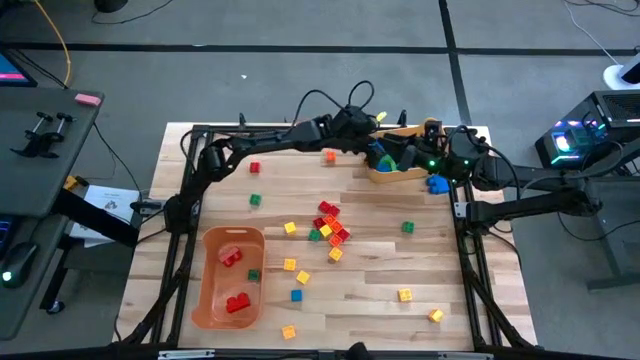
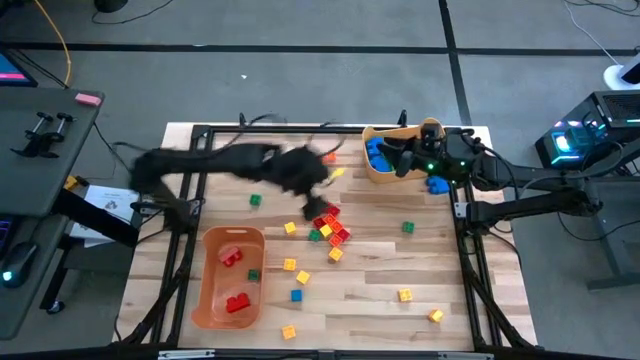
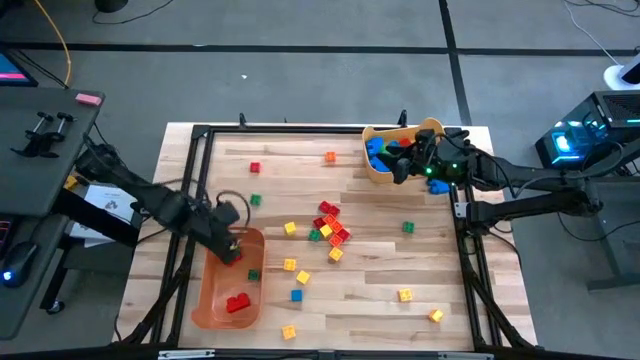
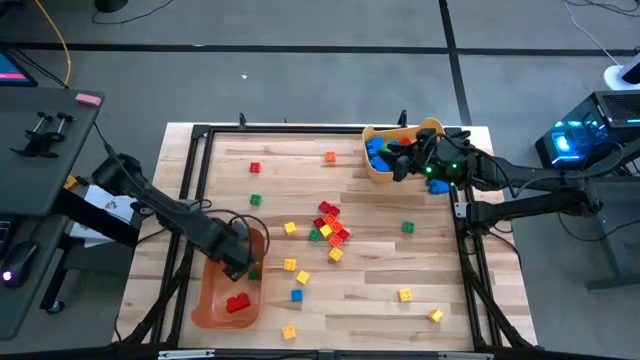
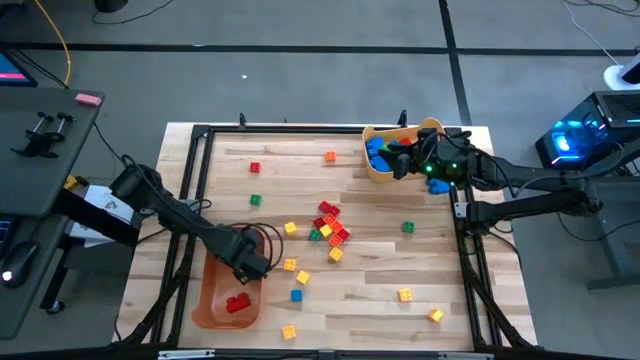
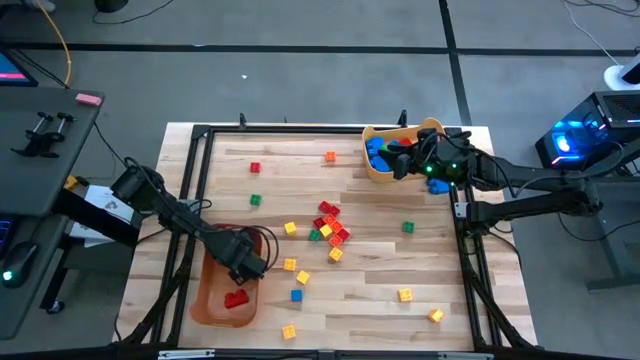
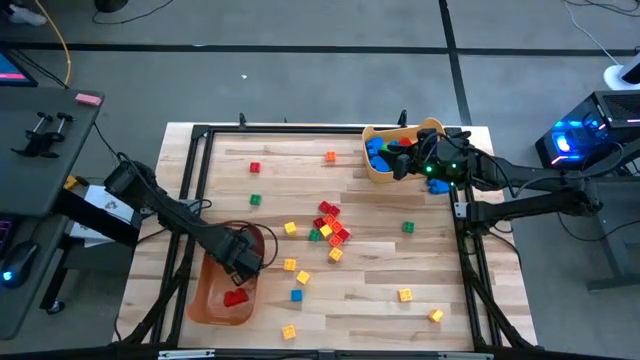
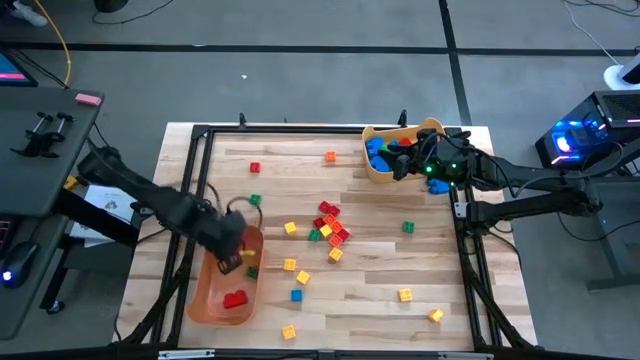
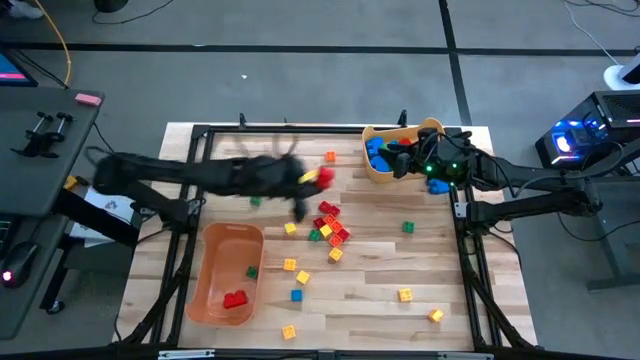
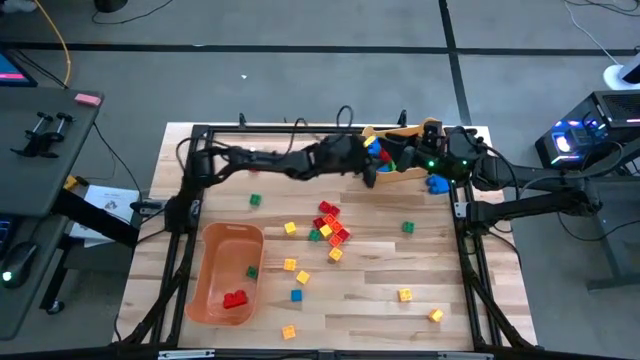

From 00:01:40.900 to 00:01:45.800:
Task: Sort blocks by size
Remove the red game piece from the orange bin and put it into the yellow bin

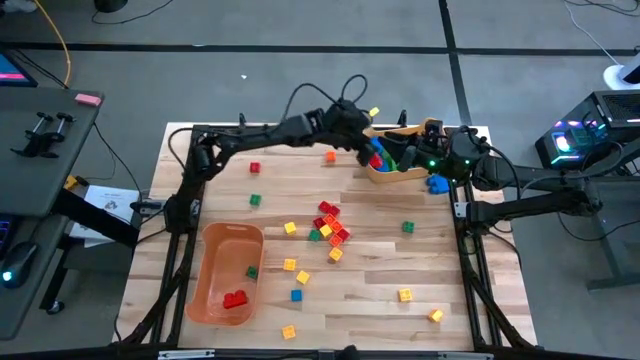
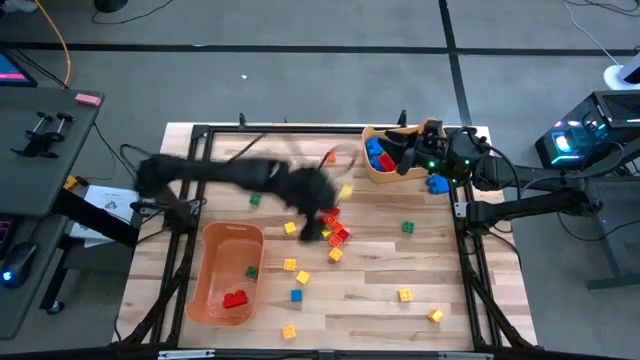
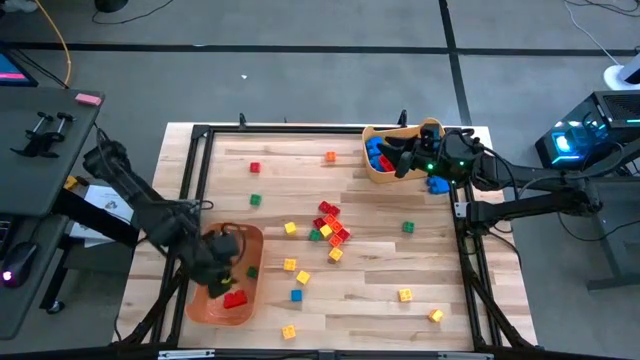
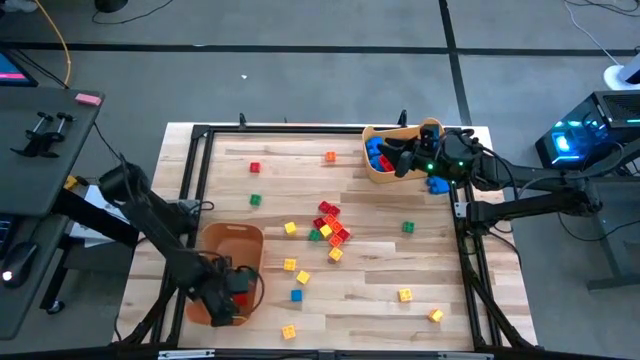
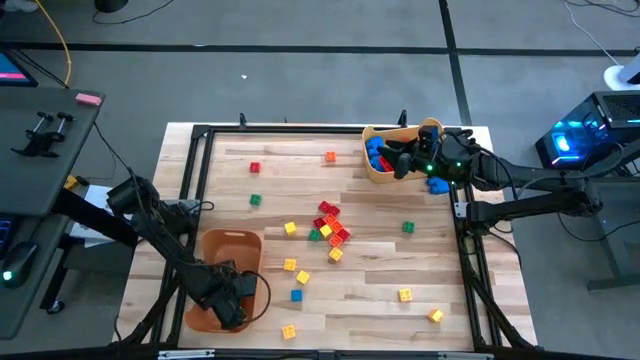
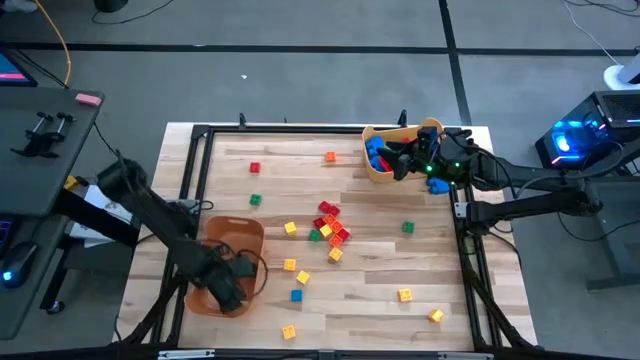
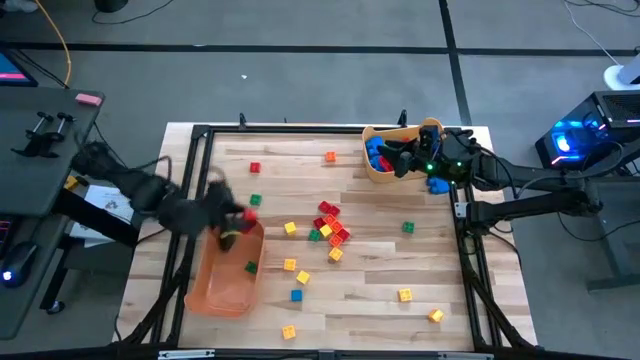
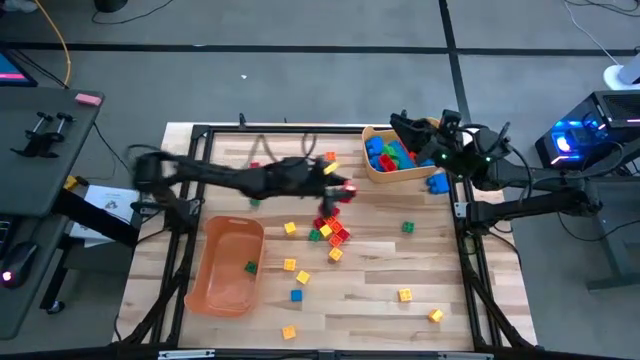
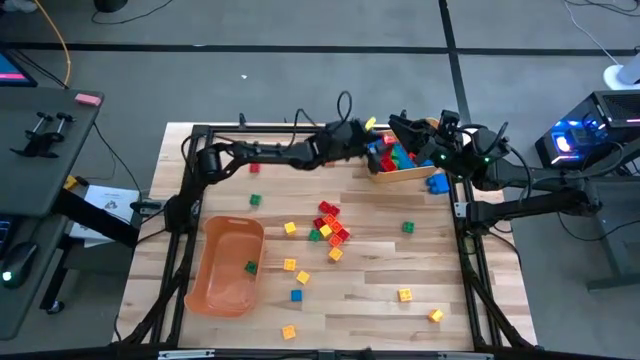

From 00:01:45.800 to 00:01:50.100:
Remove the red game piece from the orange bin and put it into the yellow bin

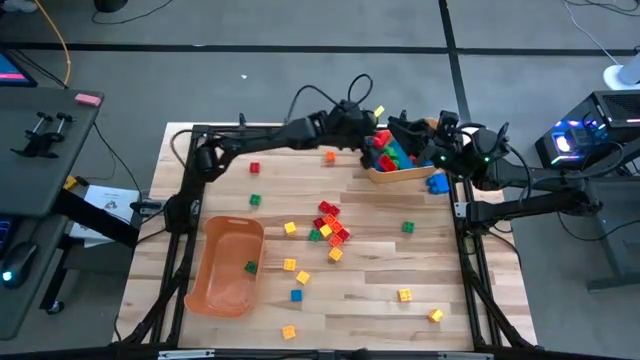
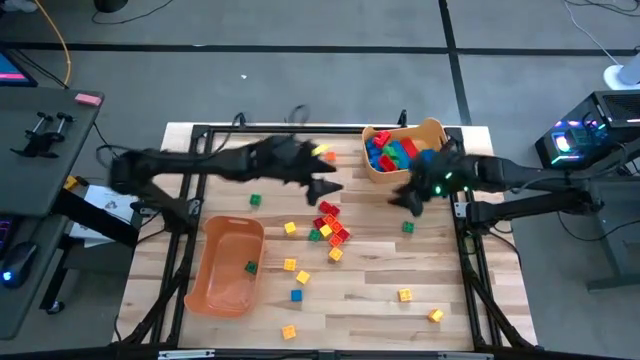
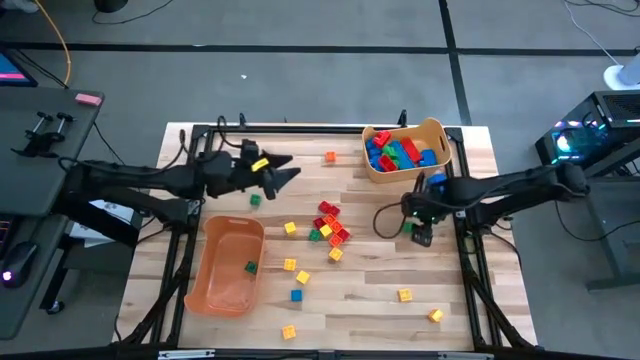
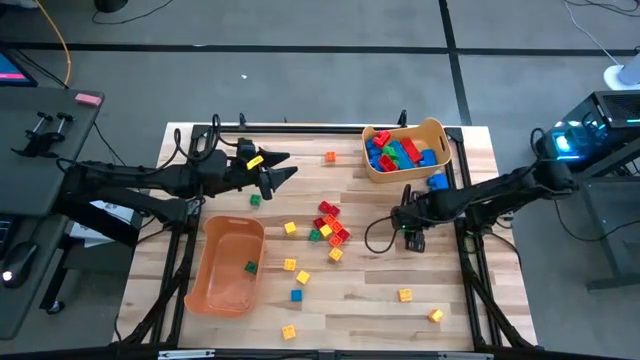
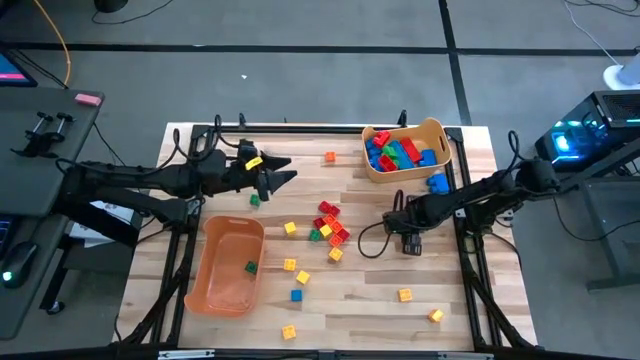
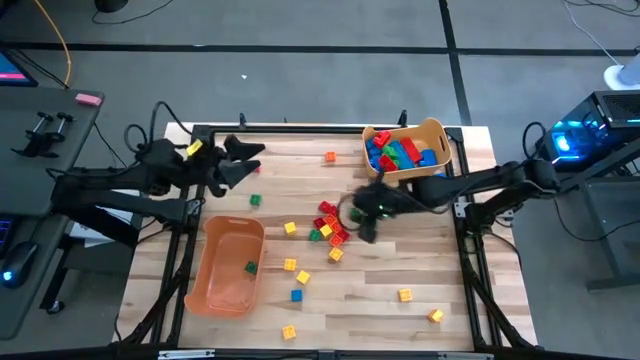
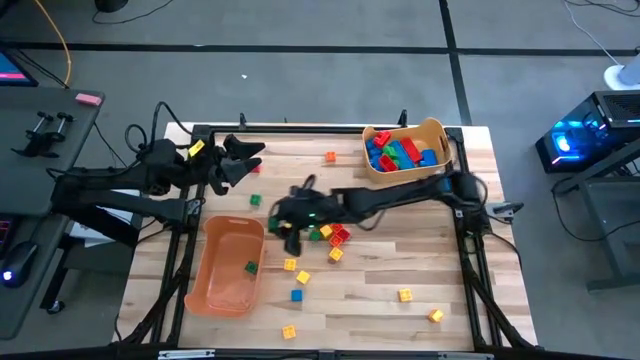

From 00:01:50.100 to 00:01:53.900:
Put the green game piece into the orange bin

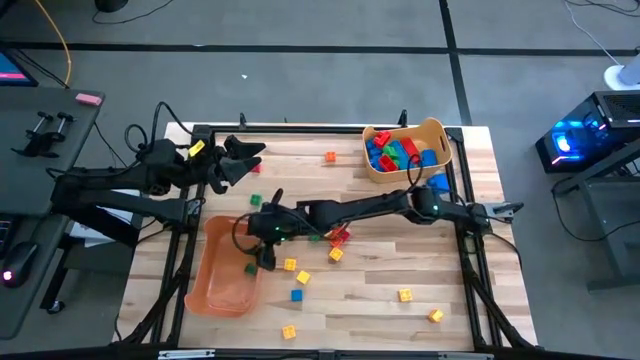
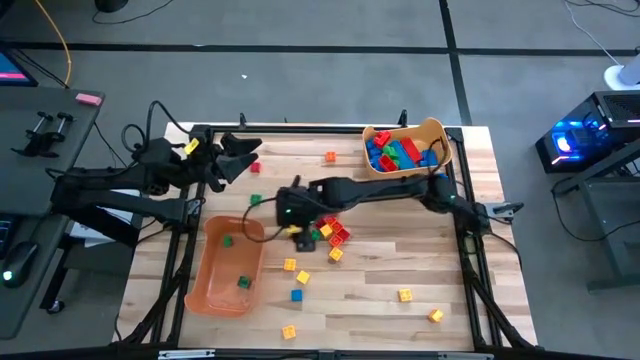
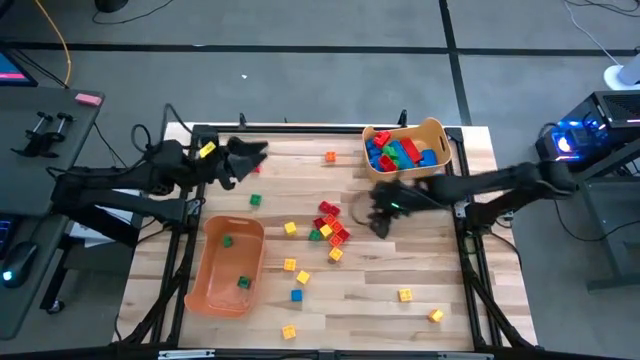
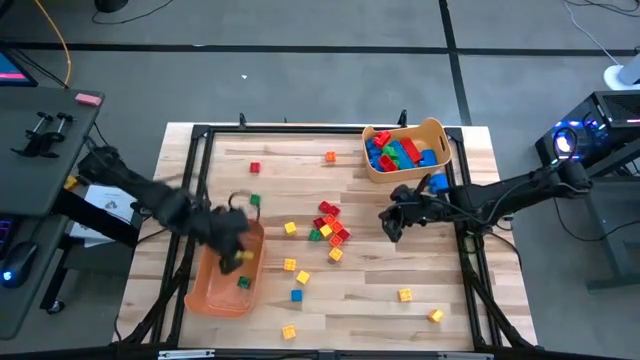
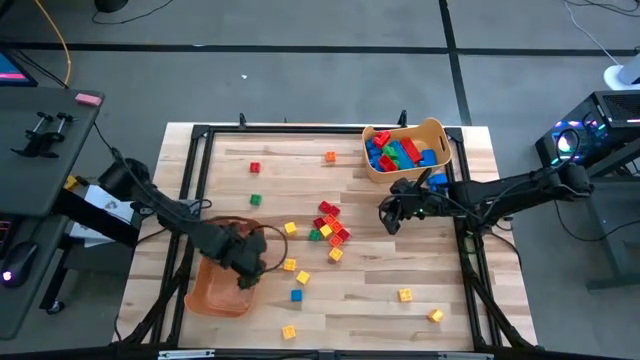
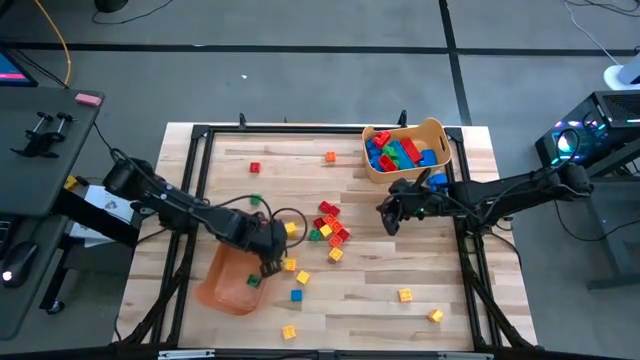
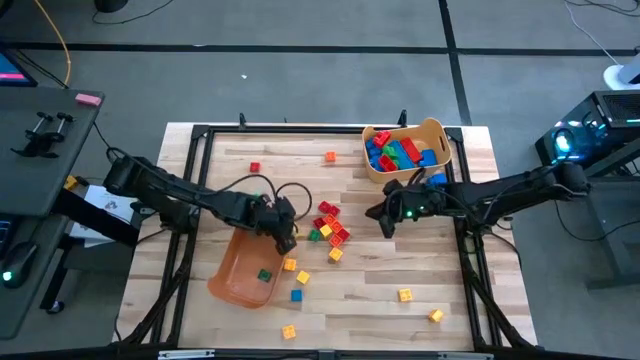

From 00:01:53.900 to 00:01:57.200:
Adjust the orange bin

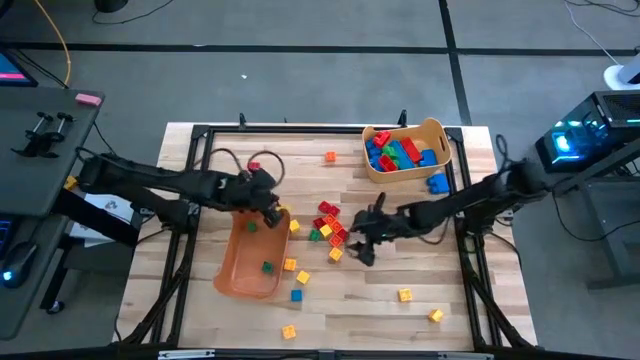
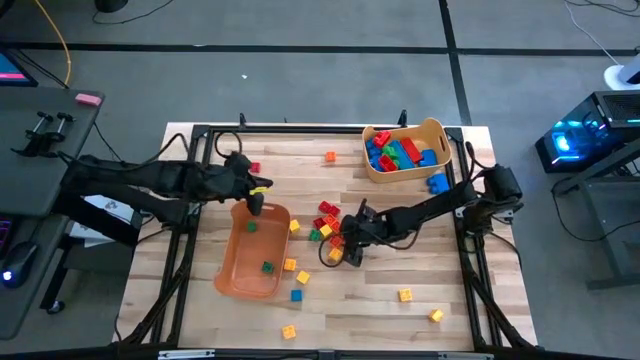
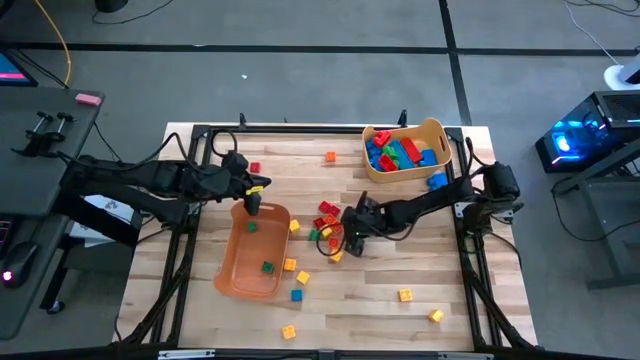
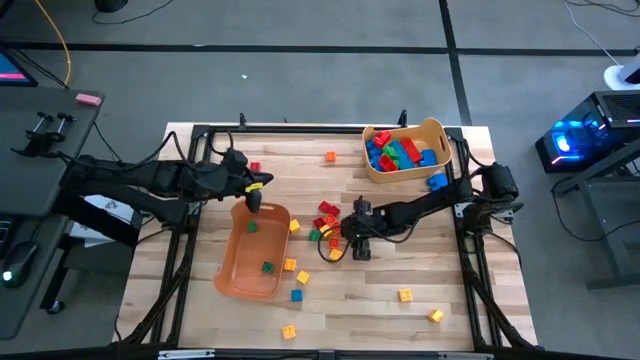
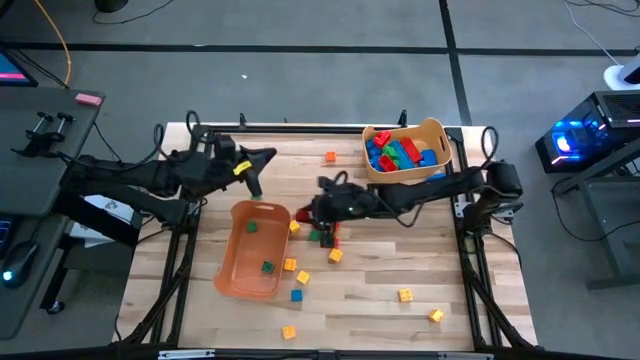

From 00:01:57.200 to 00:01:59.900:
Put the red game piece into the orange bin

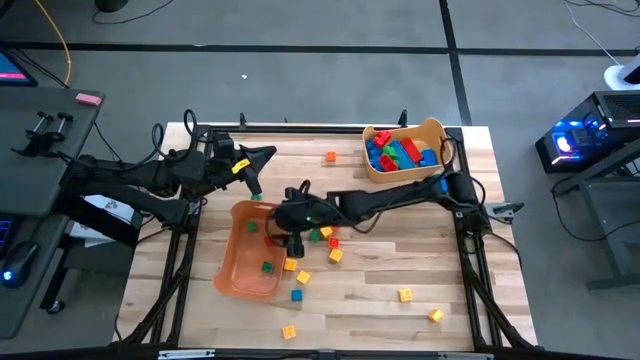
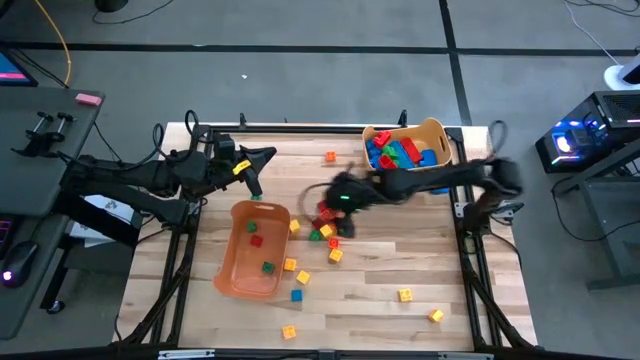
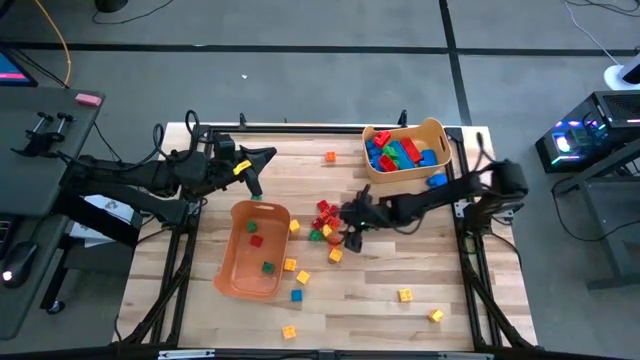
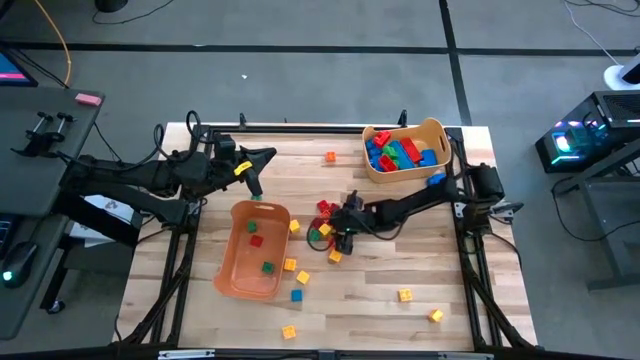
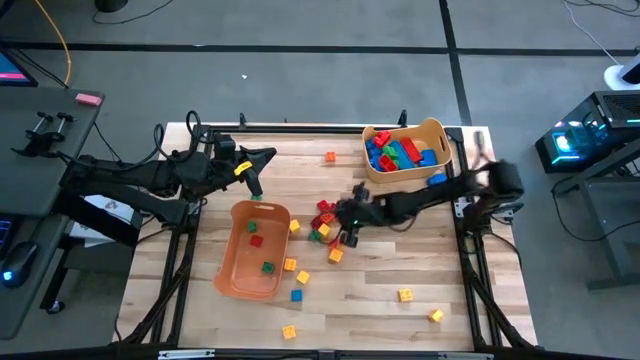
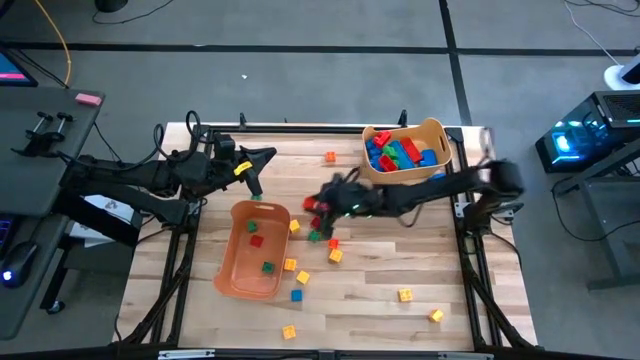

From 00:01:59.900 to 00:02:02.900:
Put the orange game piece into the orange bin
